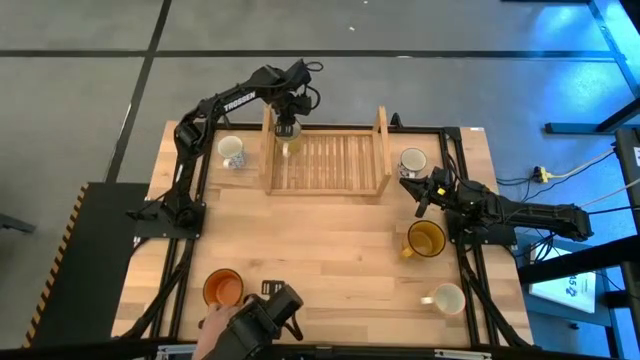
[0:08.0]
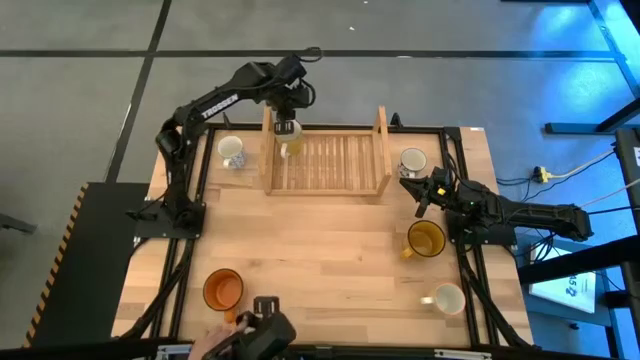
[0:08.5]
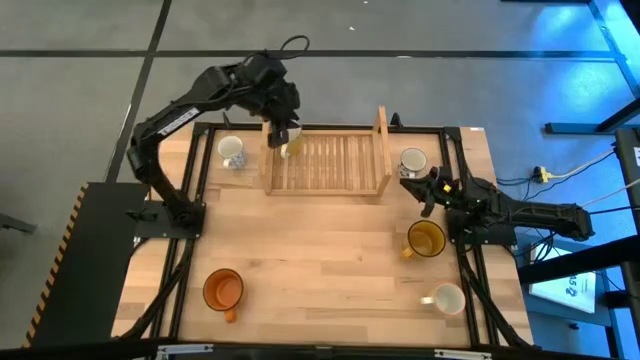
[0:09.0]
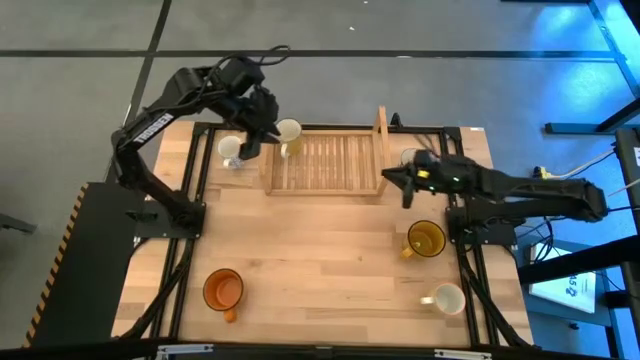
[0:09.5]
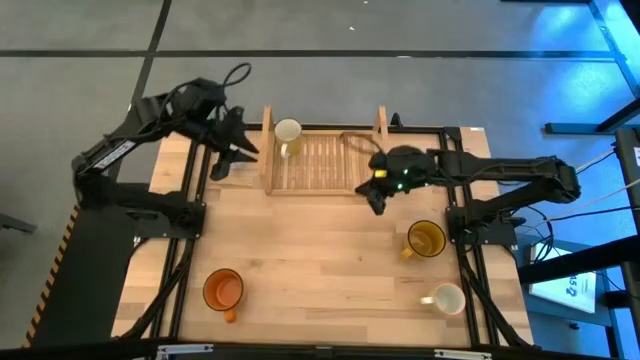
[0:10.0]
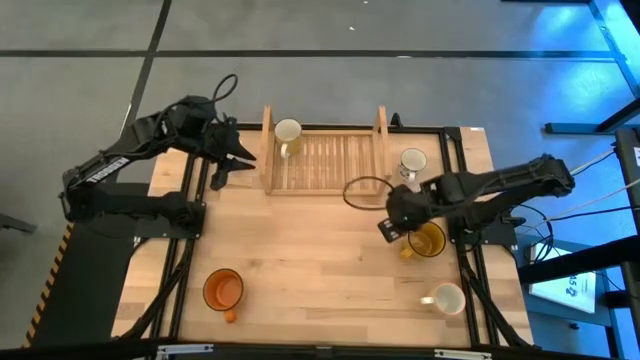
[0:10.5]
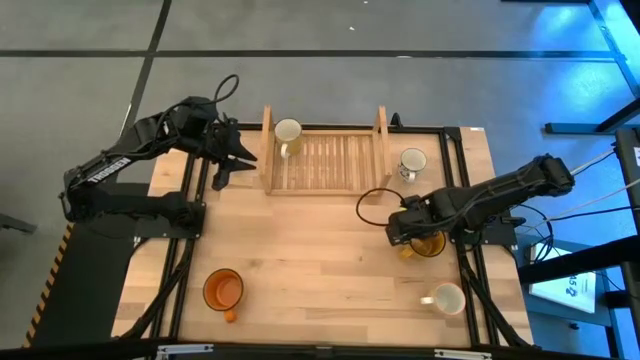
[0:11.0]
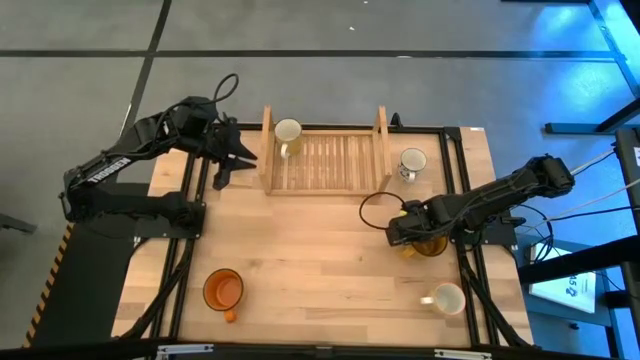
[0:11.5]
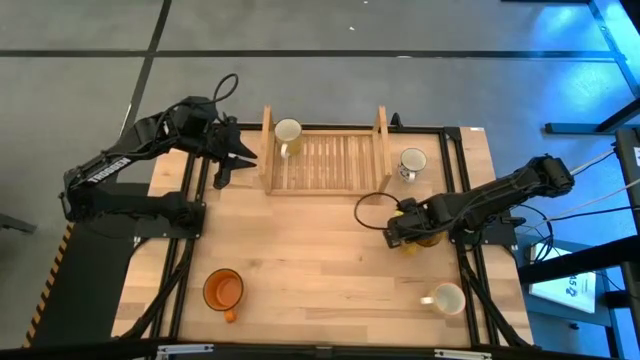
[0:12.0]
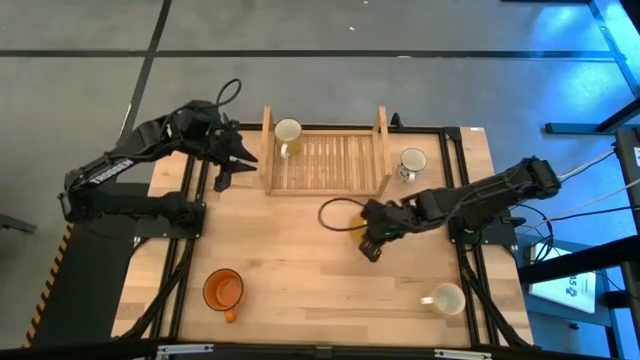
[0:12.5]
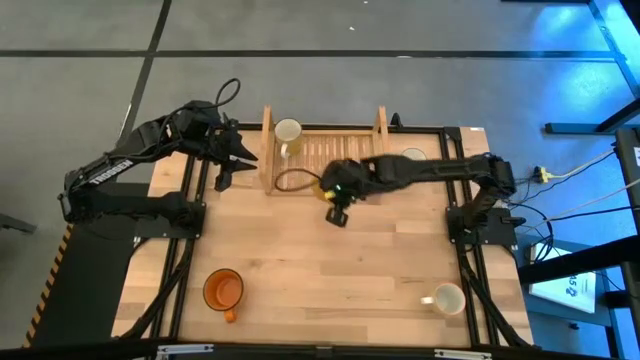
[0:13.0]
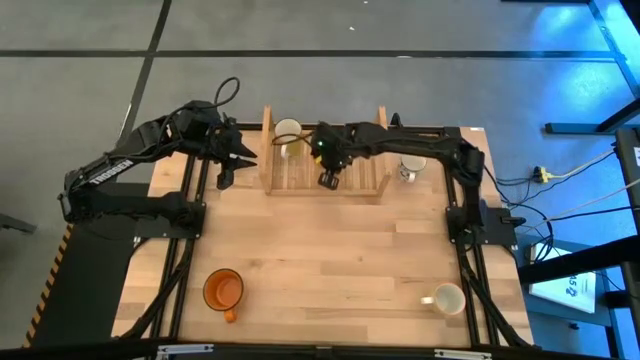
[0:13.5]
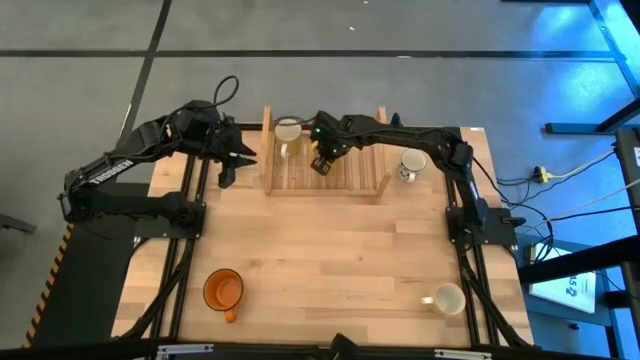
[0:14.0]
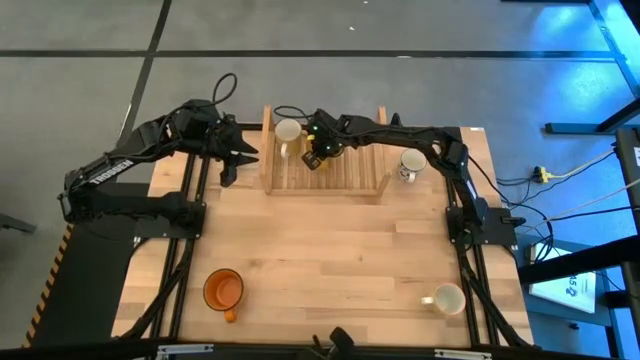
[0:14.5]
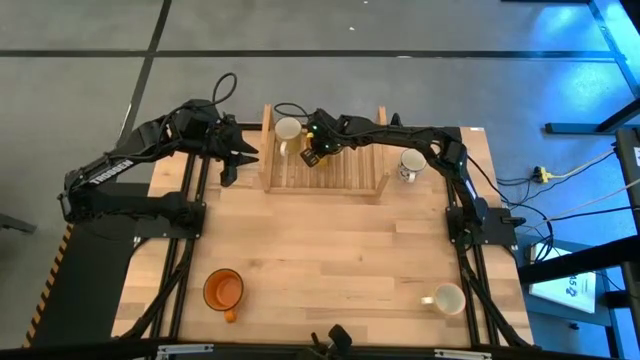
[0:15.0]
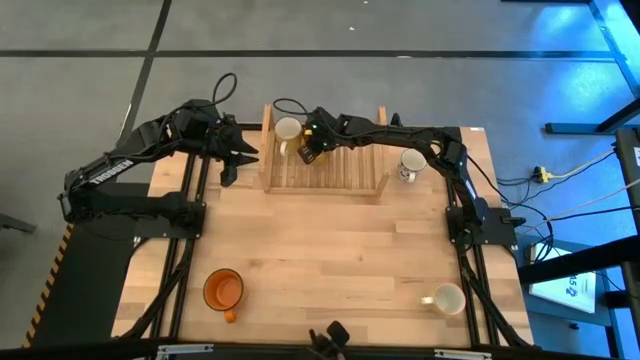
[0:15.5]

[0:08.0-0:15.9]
Task: Place coffee mugs
Put the dark yellow mug on the shelf

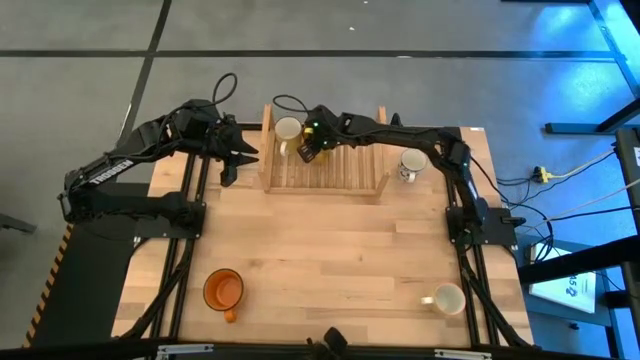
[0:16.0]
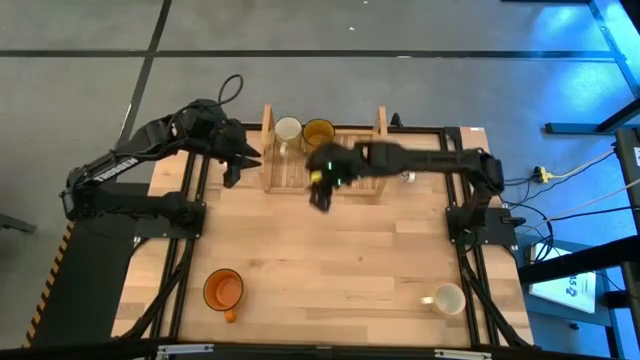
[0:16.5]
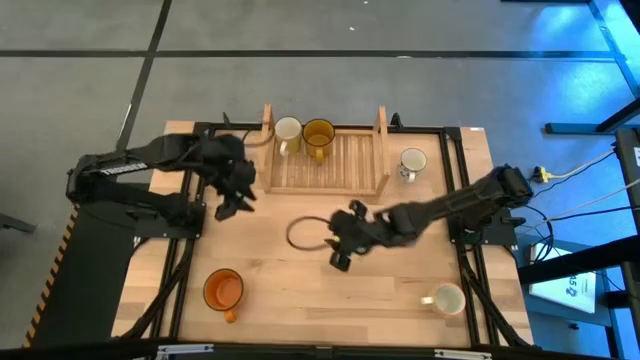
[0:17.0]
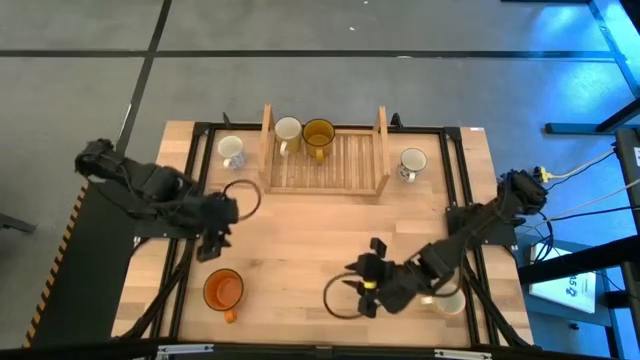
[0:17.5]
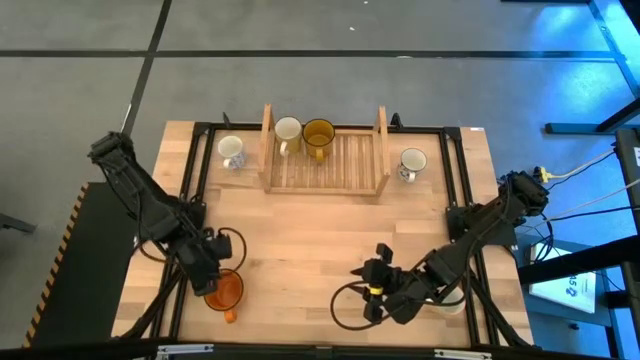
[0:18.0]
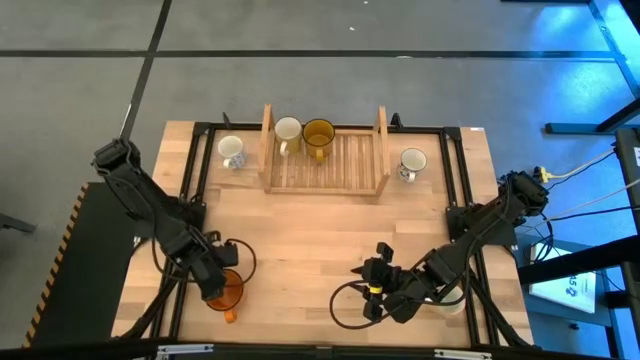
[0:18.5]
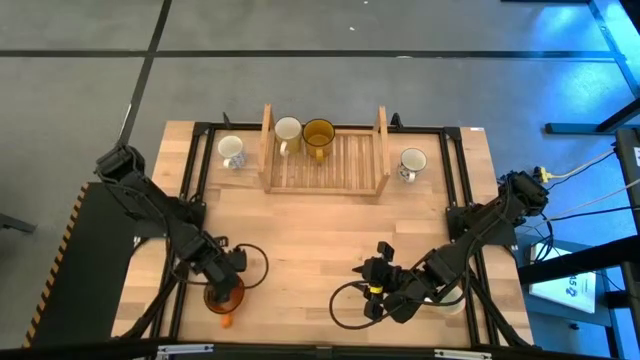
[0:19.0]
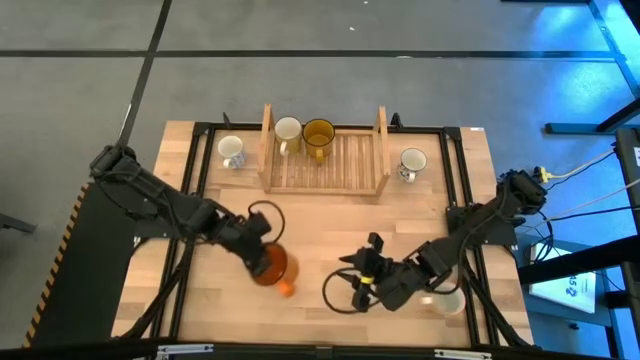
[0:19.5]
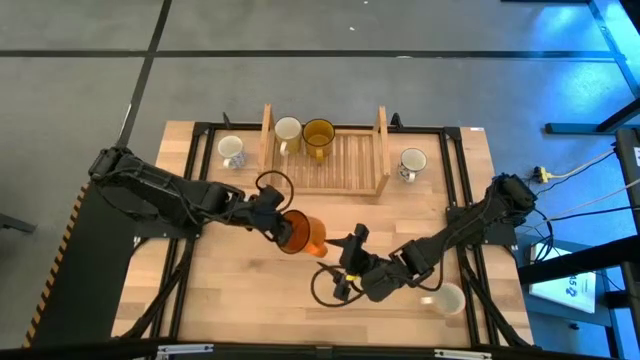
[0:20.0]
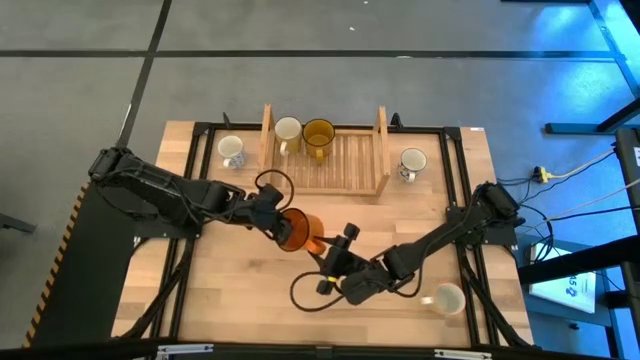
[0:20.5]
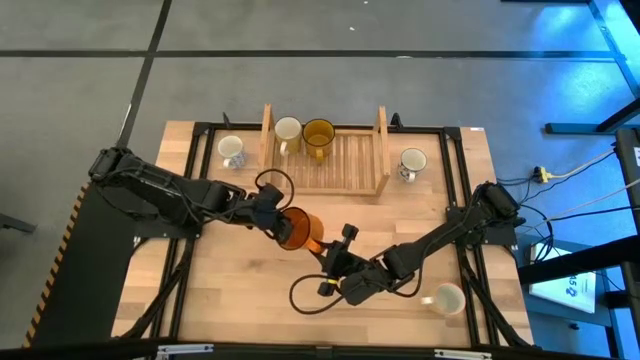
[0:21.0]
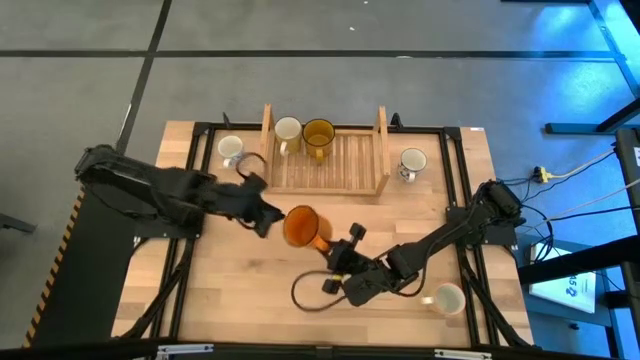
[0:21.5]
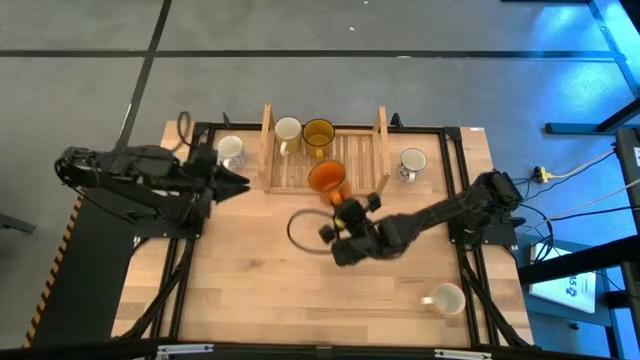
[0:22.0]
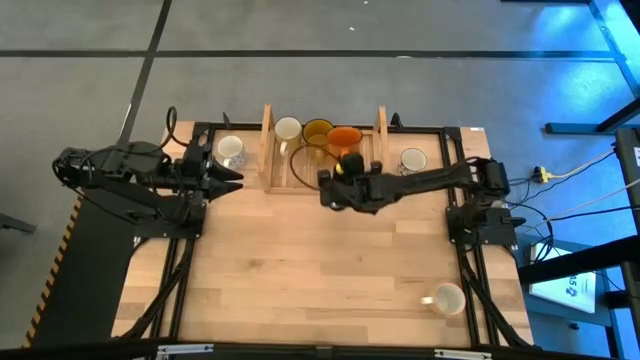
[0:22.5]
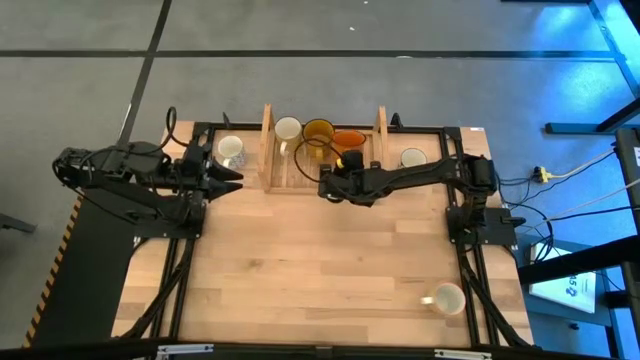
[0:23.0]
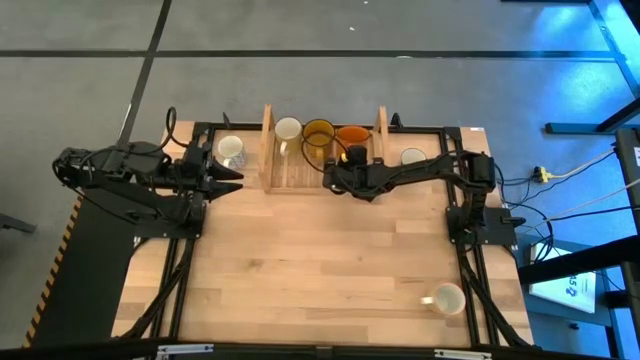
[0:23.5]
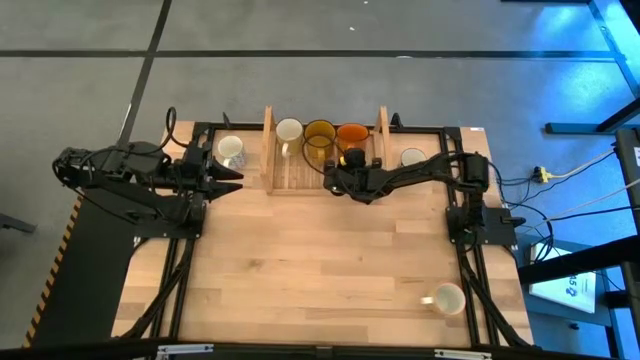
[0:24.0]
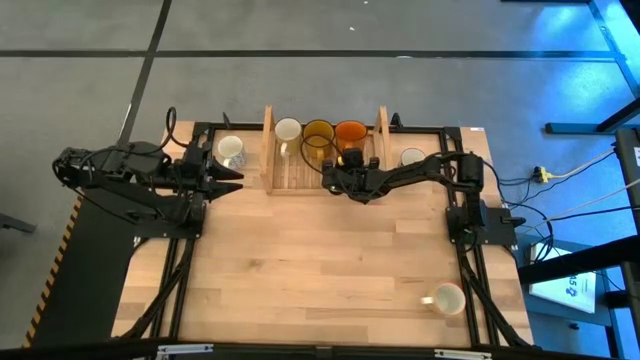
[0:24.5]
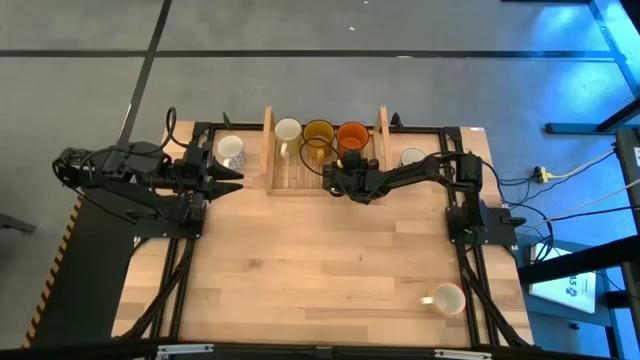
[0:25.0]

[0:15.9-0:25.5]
Put the orange mug on the shelf

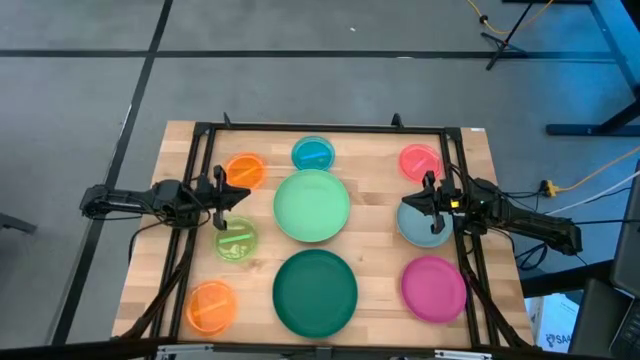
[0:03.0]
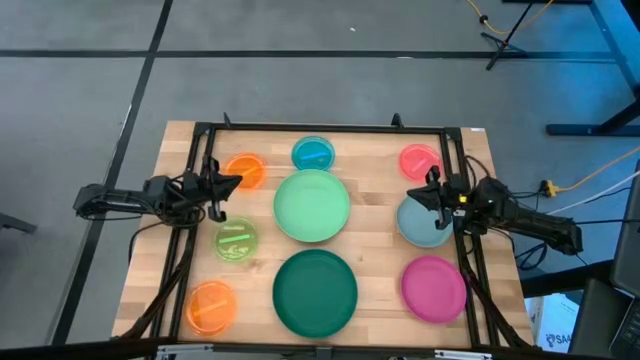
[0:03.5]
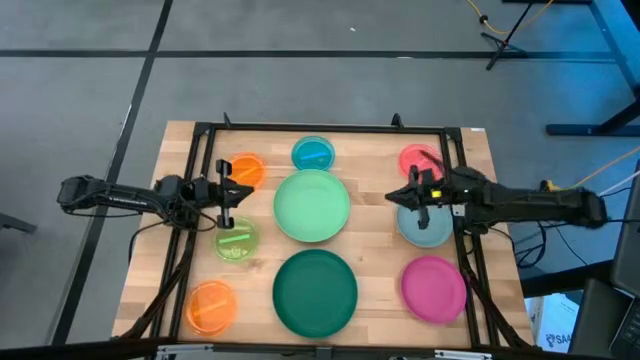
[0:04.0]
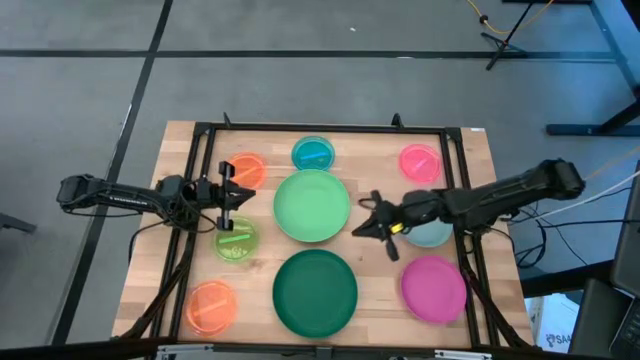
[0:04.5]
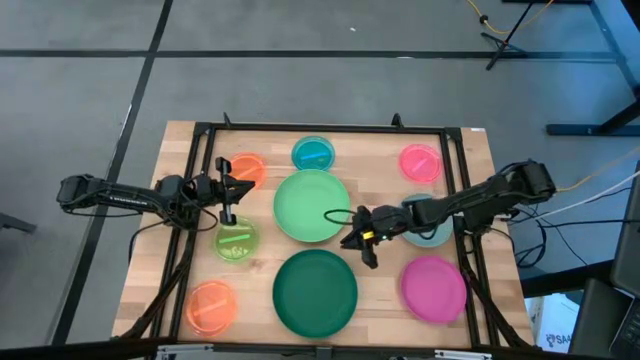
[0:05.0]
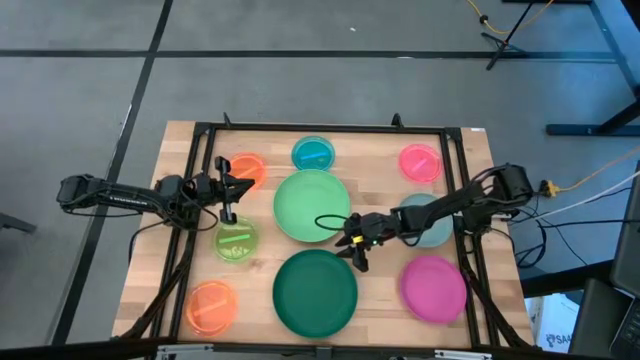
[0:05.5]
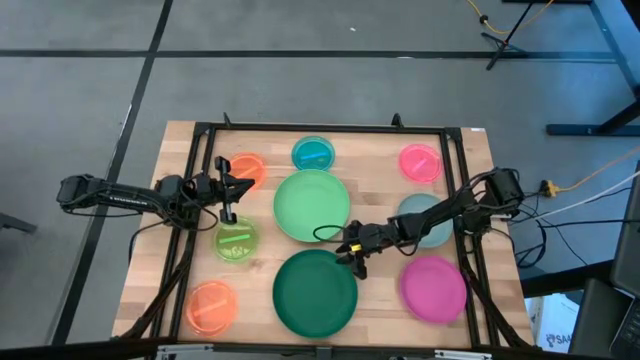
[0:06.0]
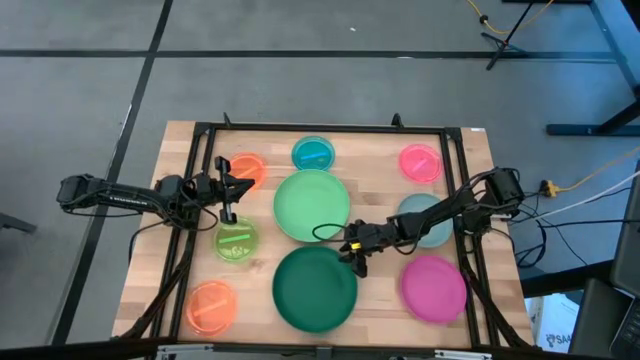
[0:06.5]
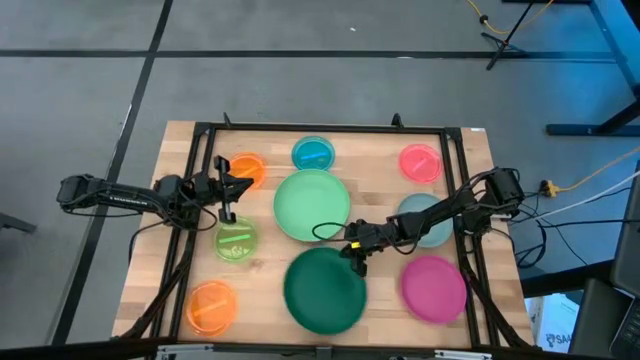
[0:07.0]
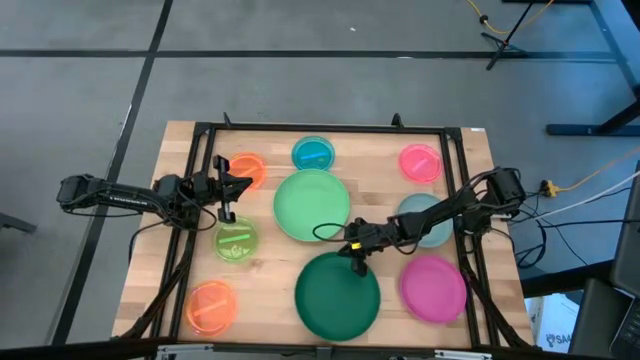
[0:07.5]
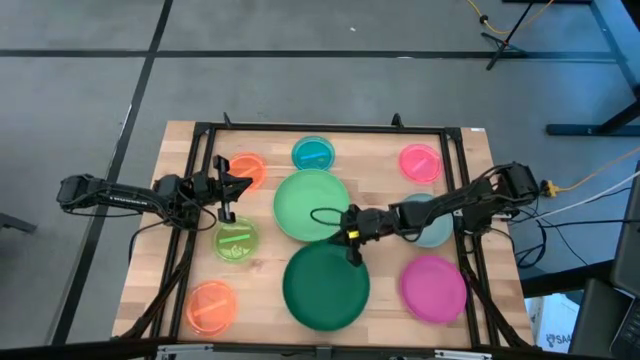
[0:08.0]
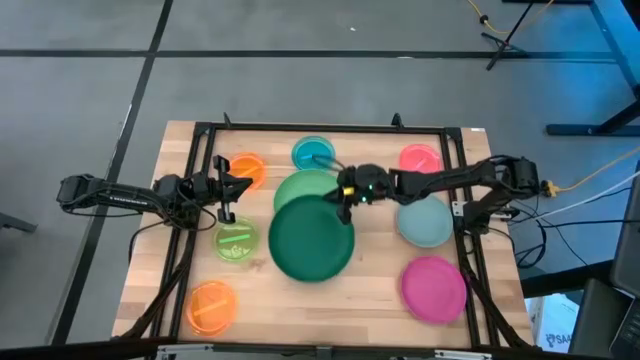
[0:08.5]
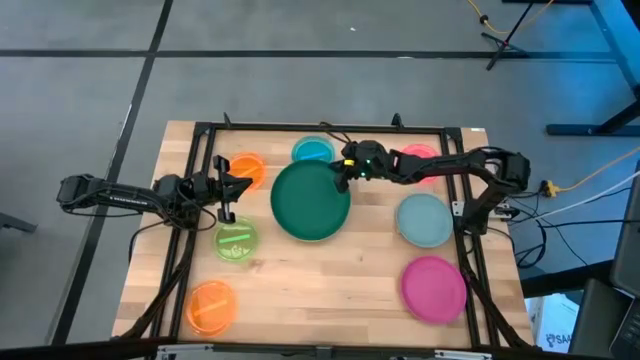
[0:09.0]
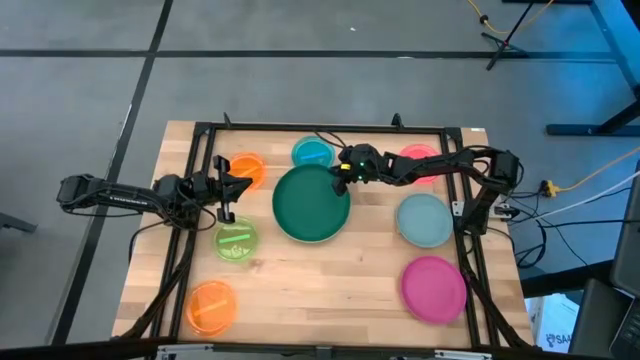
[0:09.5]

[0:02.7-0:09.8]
Task: Stack plastic plates
Stack the dark green plate on top of the green plate
